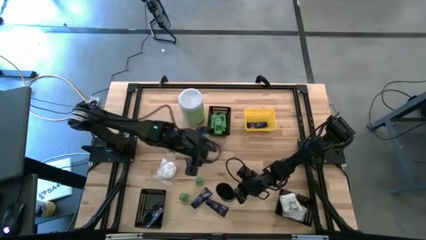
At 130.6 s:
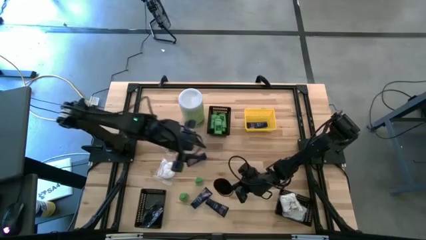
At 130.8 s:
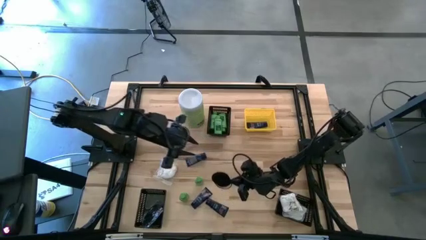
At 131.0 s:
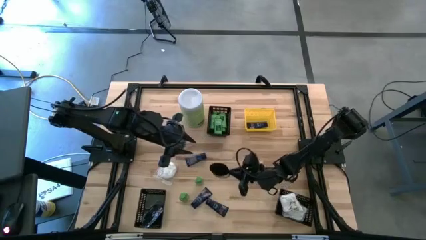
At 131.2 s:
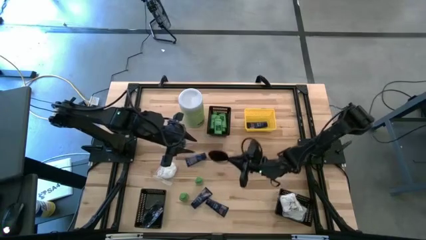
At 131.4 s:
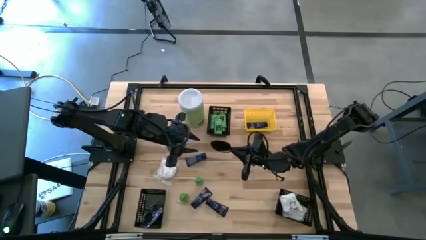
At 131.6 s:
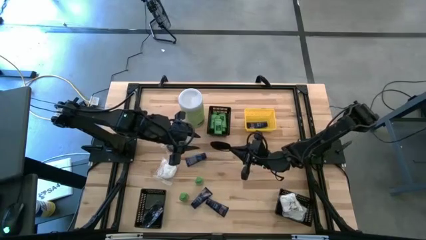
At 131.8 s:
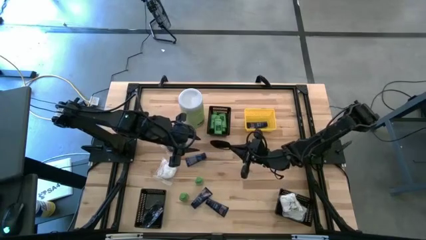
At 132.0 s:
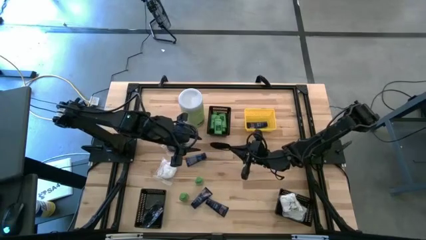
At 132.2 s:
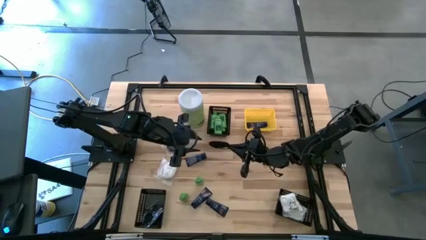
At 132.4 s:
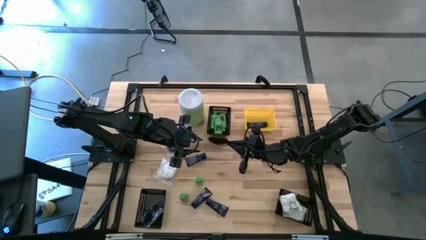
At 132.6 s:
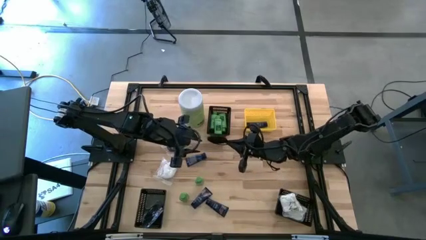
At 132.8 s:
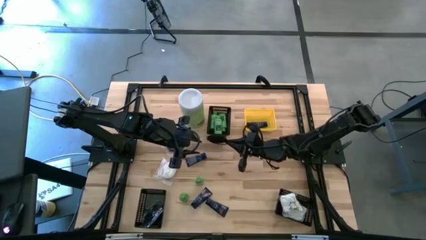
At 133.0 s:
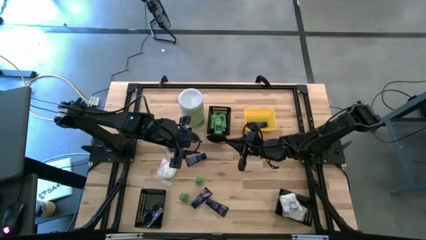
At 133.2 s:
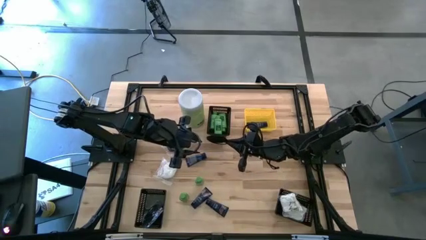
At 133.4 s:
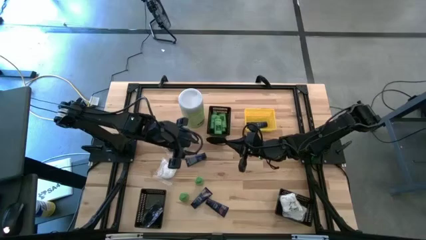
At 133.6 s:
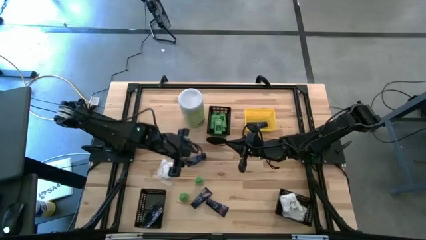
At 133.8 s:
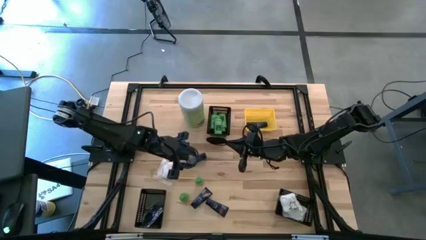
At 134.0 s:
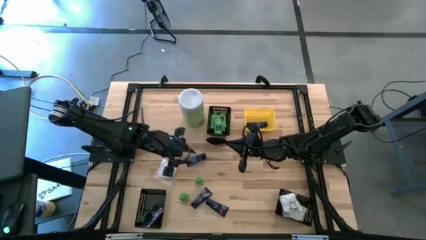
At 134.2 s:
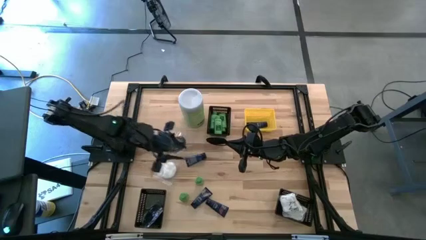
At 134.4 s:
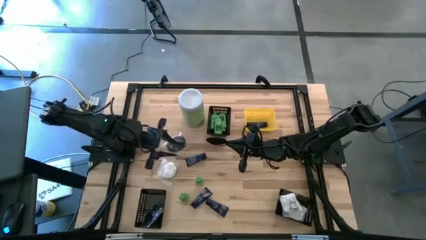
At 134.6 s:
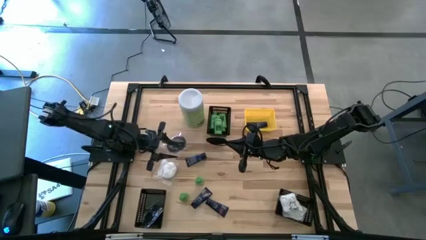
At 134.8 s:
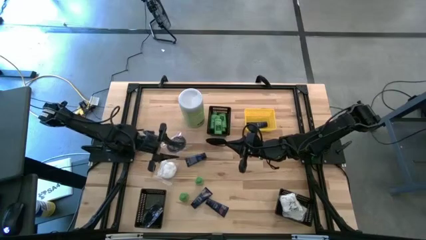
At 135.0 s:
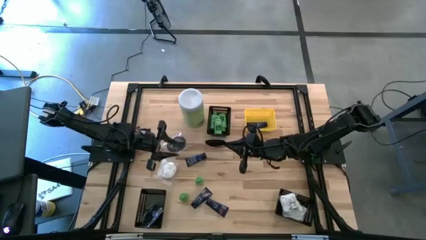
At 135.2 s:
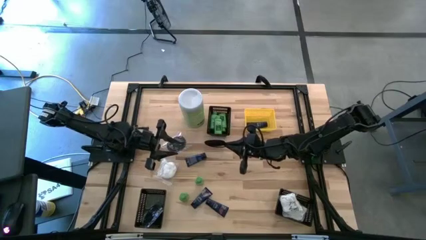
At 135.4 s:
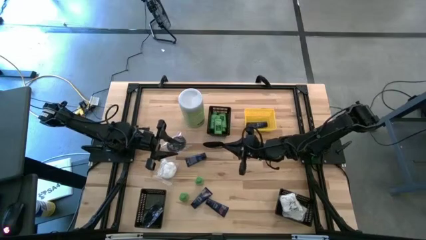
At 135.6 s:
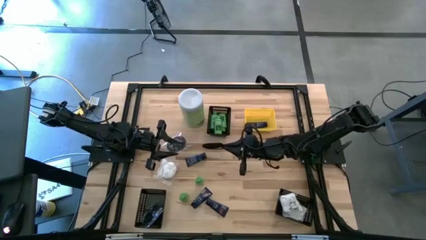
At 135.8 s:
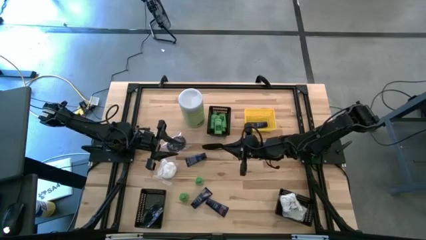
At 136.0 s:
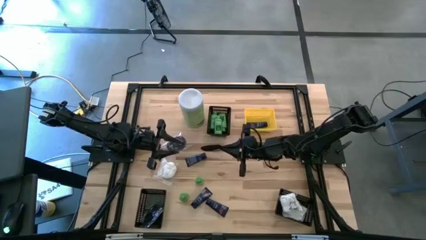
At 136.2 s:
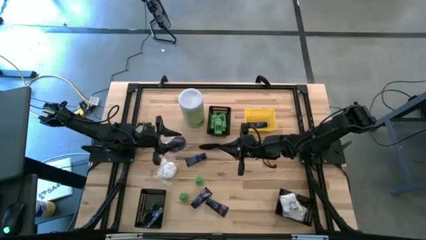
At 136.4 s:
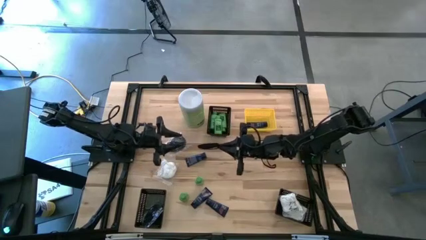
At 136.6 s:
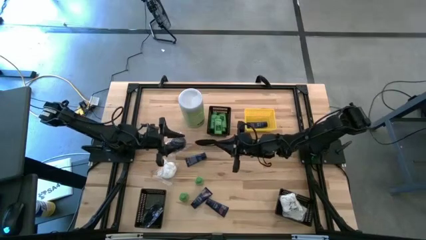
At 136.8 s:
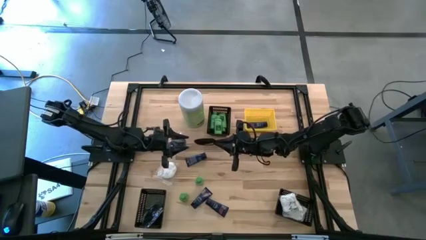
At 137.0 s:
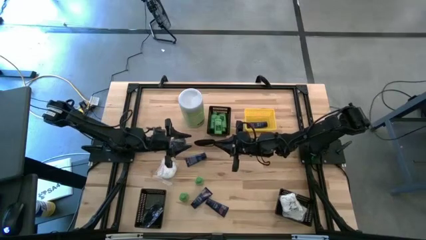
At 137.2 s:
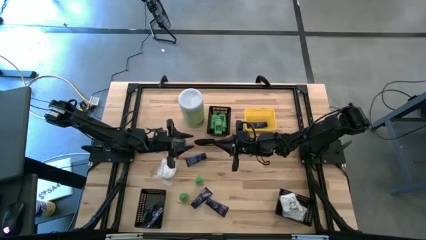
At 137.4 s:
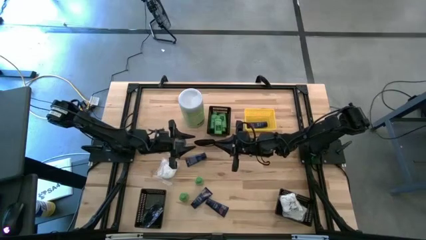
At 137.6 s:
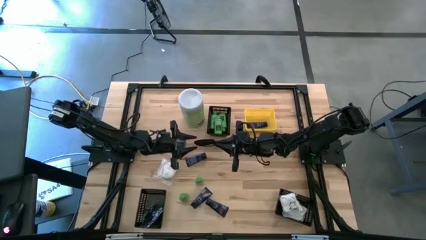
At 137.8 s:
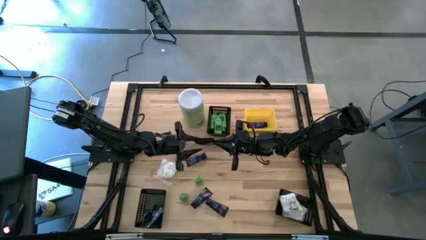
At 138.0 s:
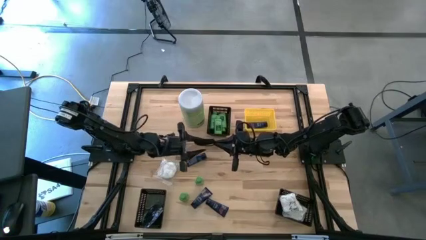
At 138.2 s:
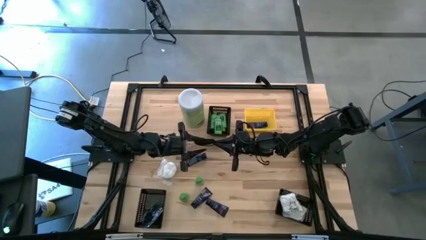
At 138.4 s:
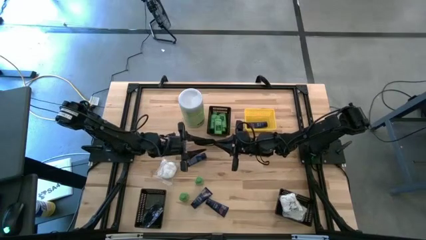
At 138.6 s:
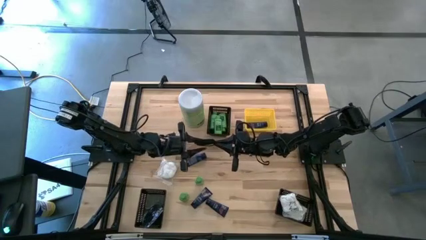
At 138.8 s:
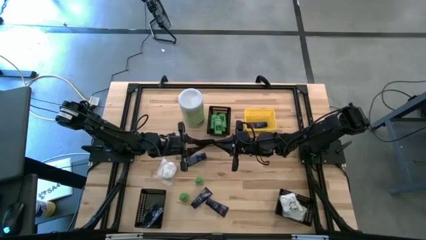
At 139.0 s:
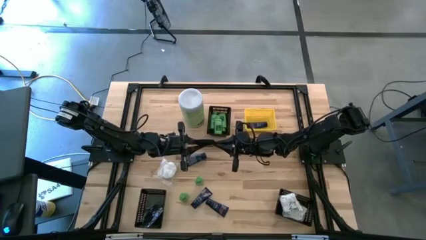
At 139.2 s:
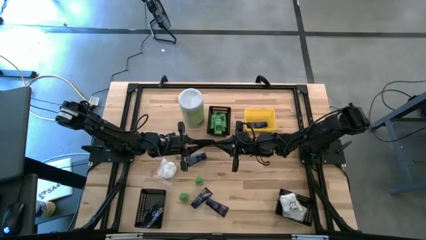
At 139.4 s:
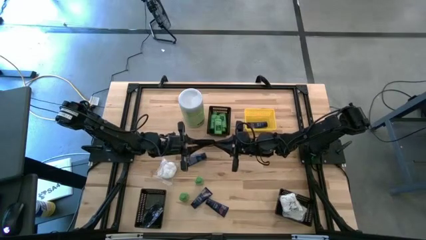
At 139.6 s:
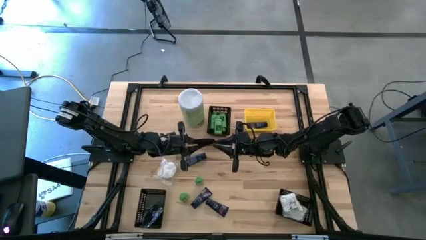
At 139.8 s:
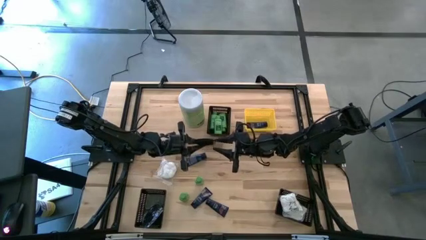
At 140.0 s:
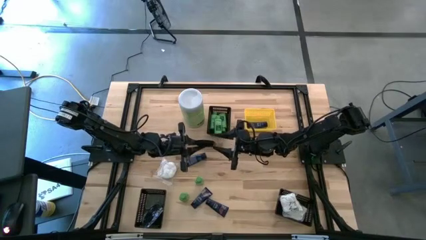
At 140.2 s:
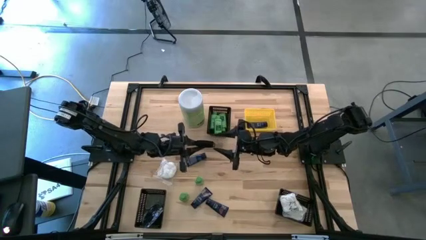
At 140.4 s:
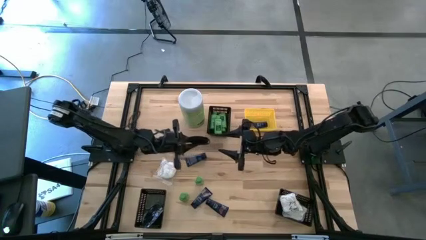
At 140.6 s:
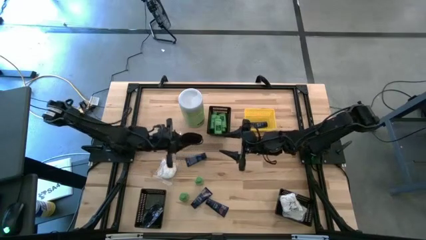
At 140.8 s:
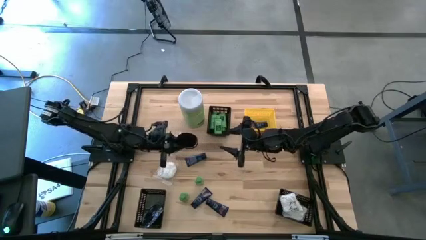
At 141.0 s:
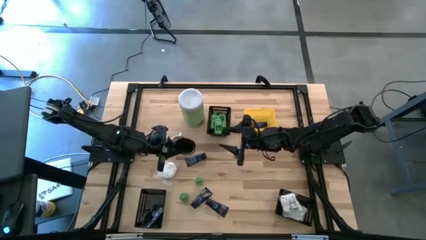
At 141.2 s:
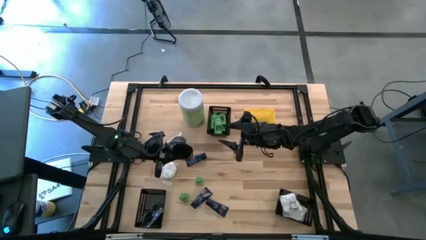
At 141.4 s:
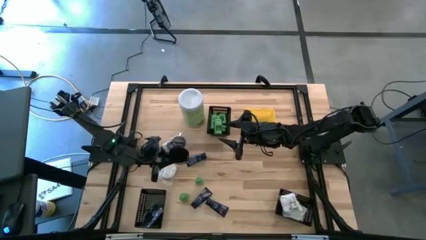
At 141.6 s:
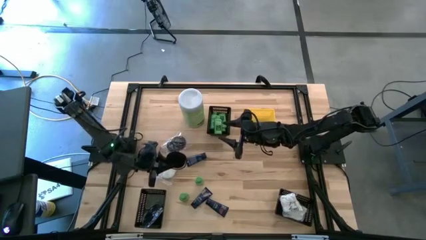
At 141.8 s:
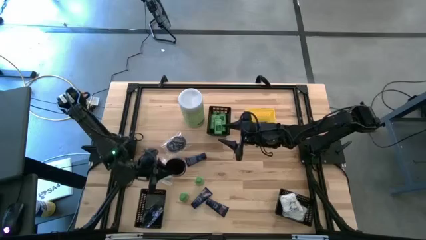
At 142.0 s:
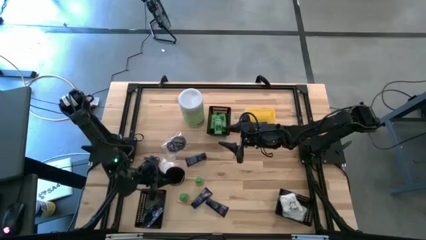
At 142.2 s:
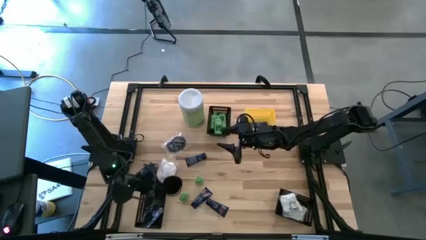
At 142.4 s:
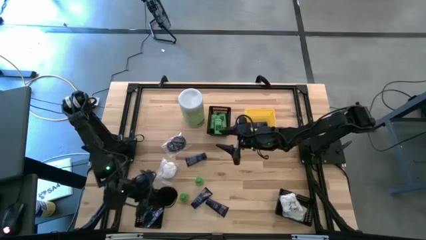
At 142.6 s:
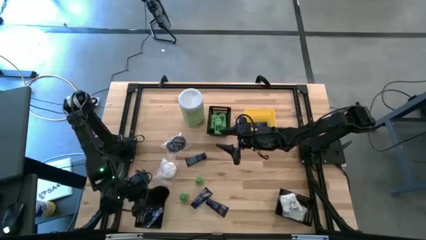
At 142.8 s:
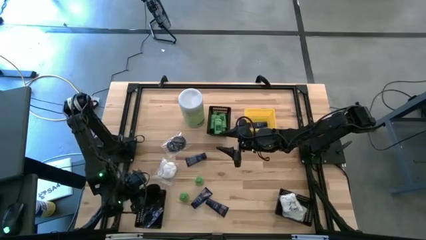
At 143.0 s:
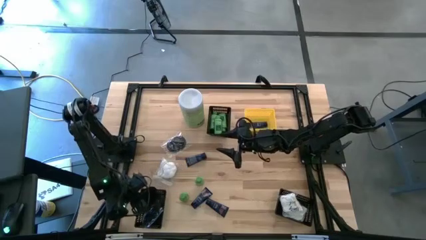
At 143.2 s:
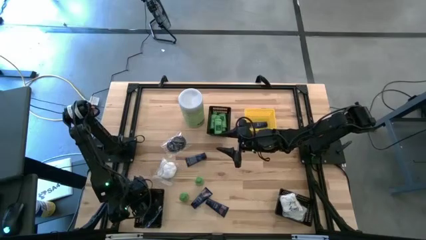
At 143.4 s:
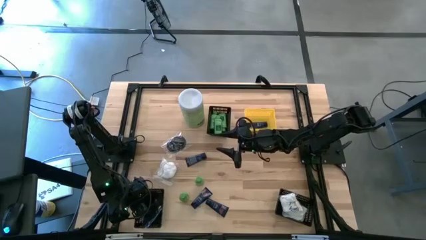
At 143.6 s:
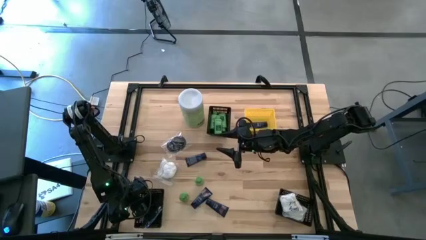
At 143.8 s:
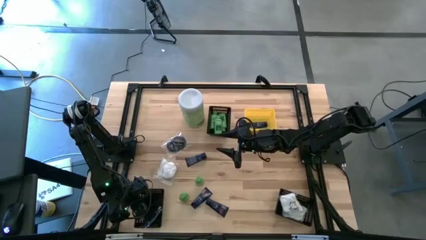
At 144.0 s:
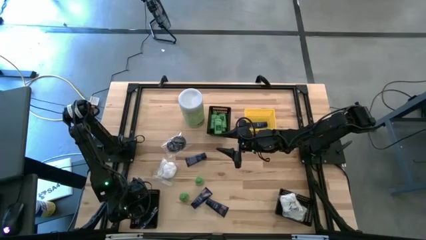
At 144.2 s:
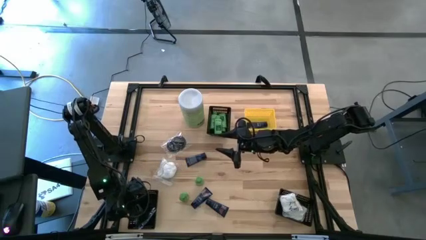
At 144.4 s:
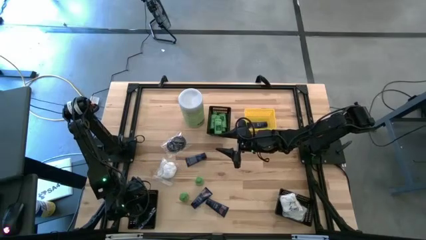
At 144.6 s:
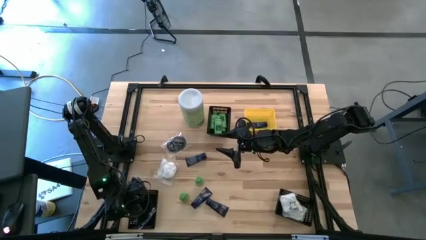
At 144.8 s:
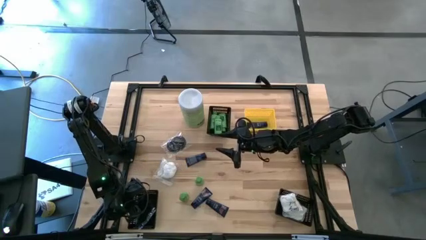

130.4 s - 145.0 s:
Task: Pick & Place Travel size toiletries
Put the black hair brush into the bottom left black bin
